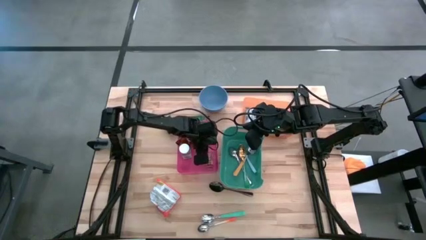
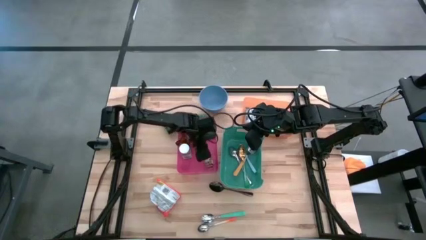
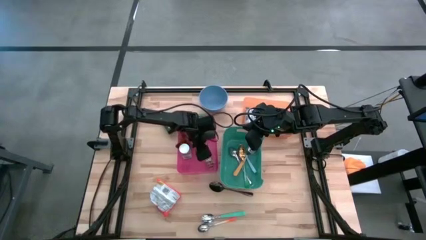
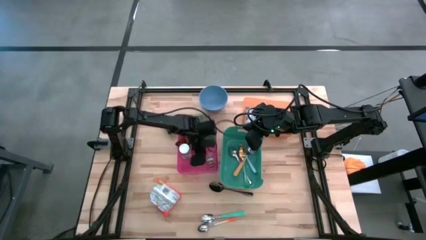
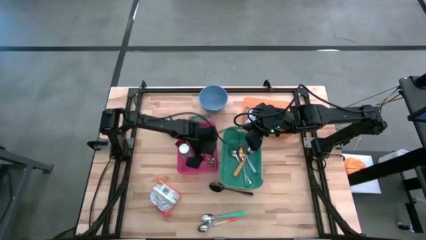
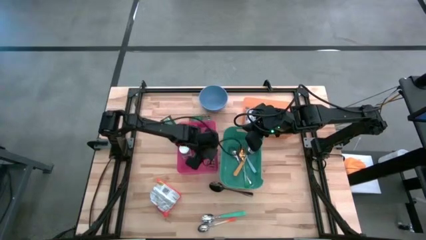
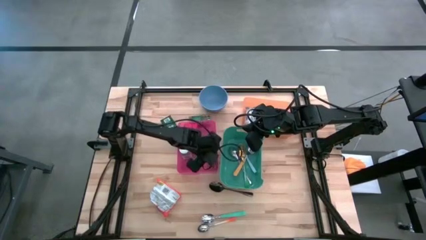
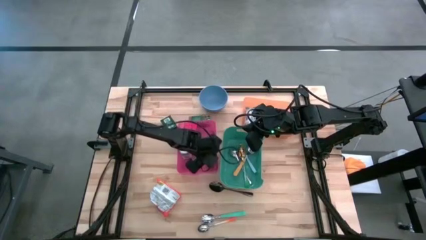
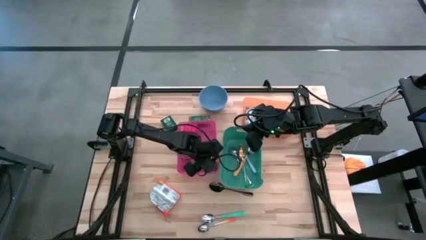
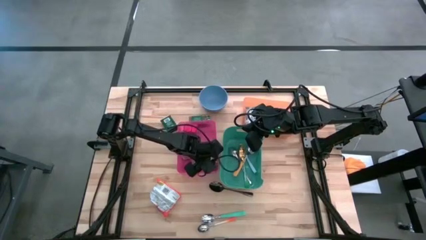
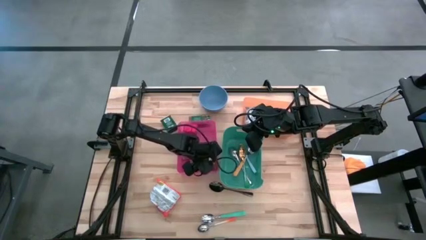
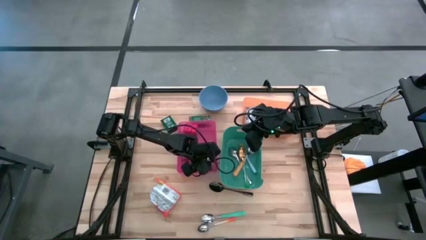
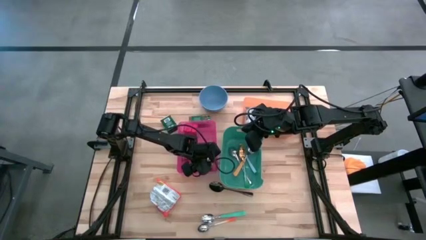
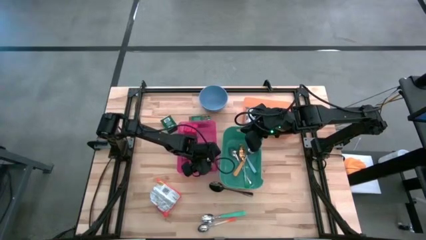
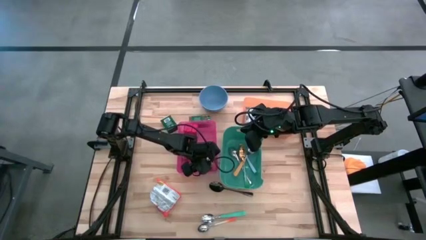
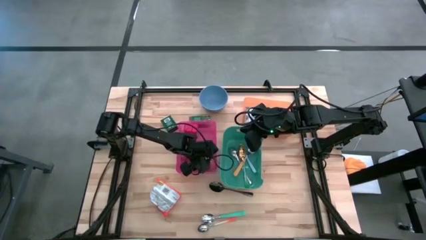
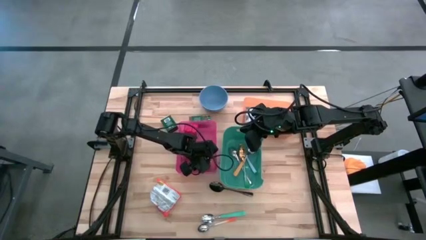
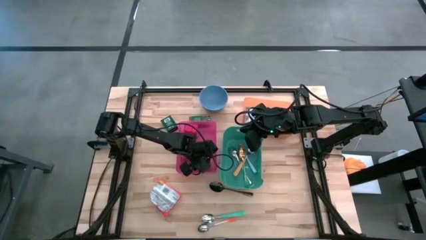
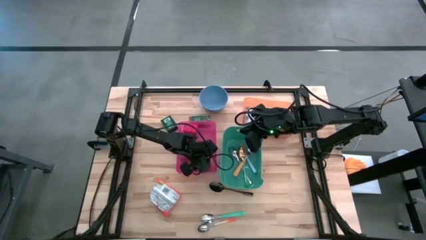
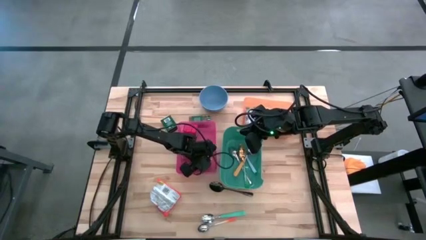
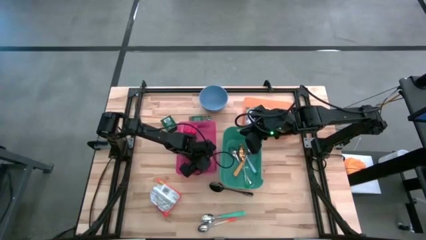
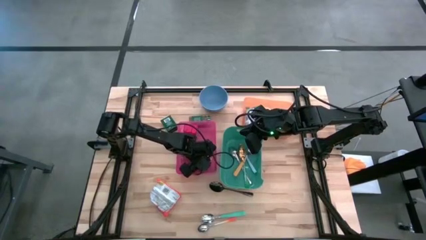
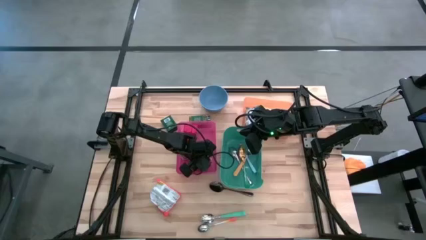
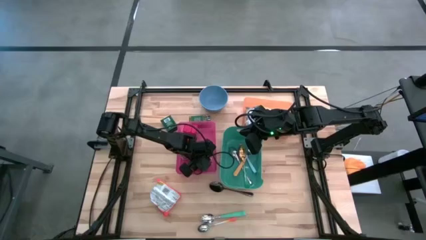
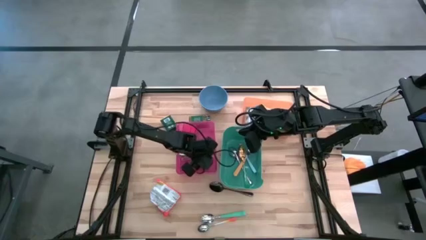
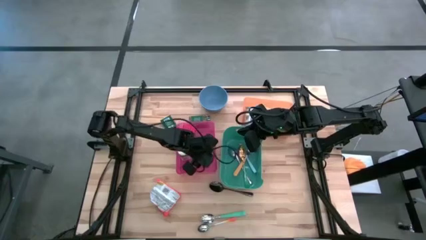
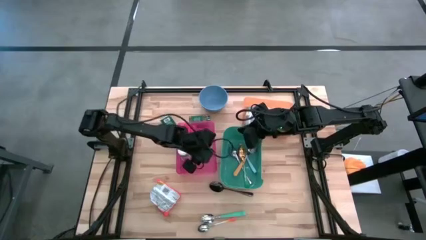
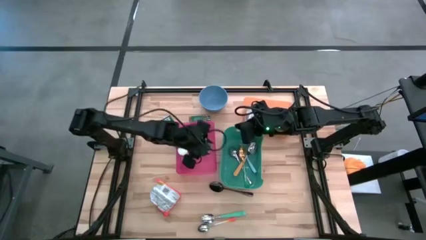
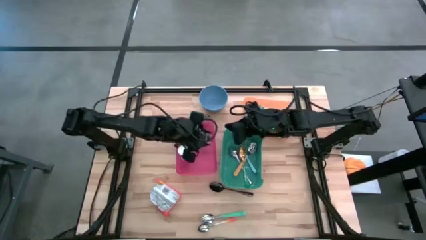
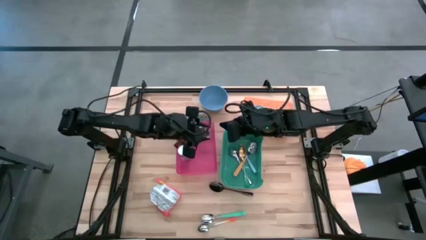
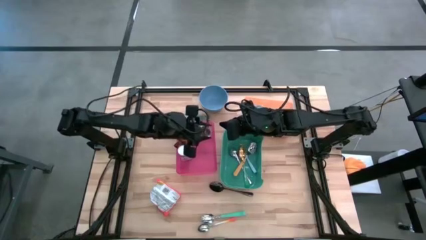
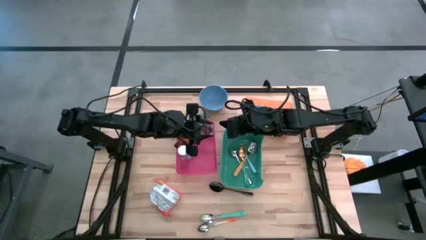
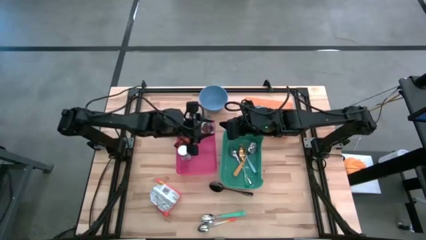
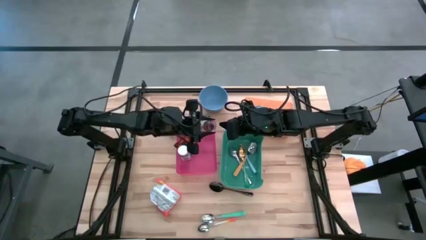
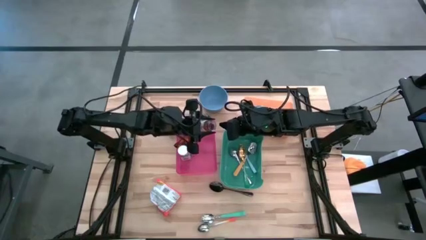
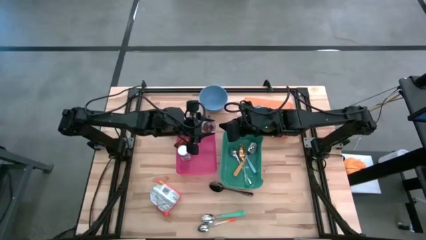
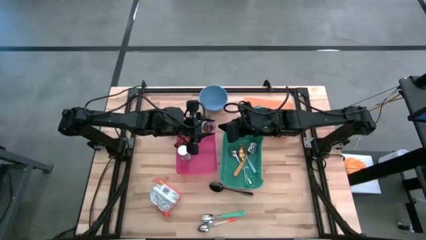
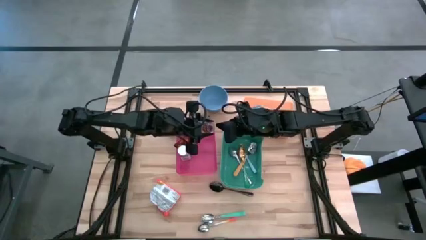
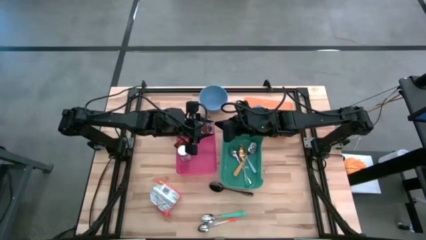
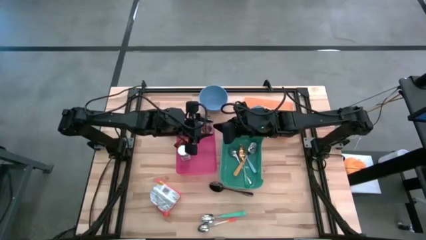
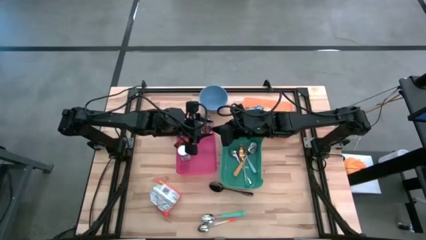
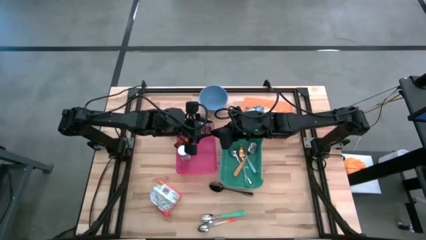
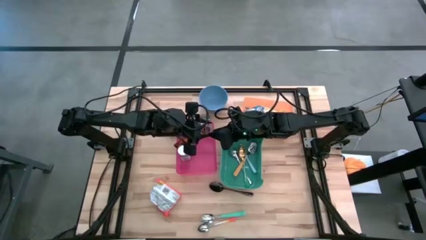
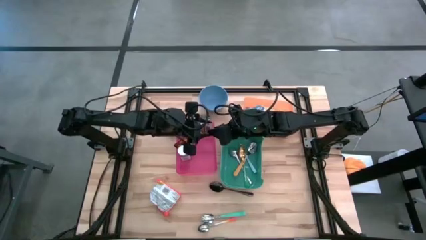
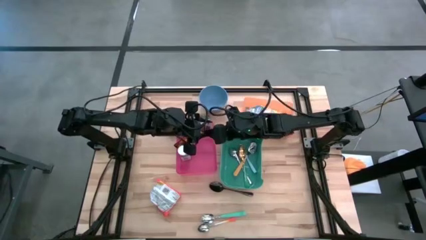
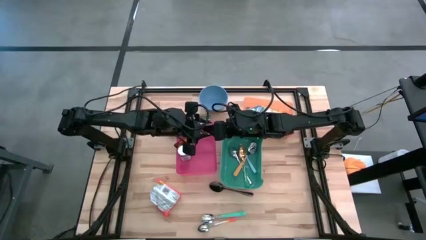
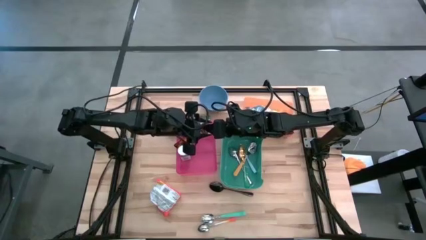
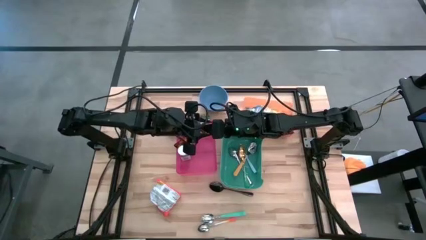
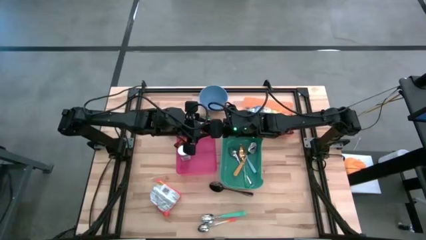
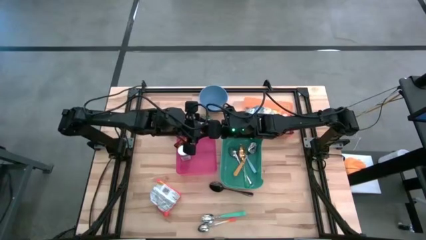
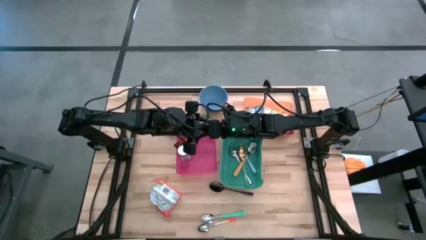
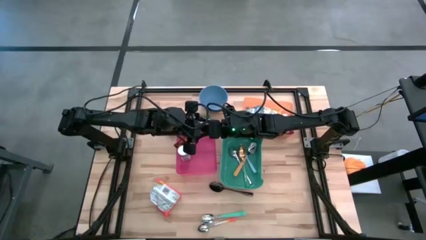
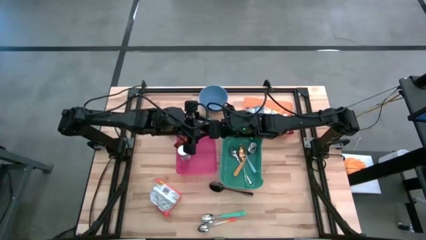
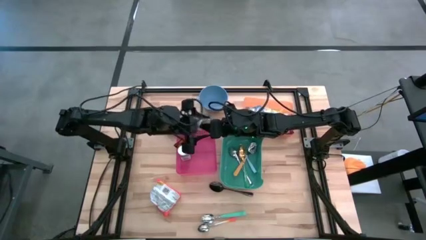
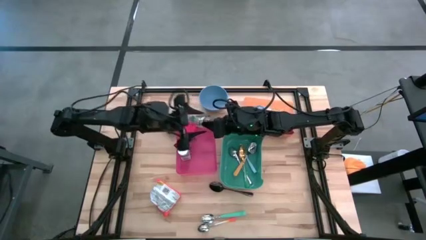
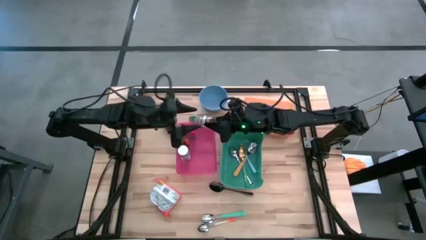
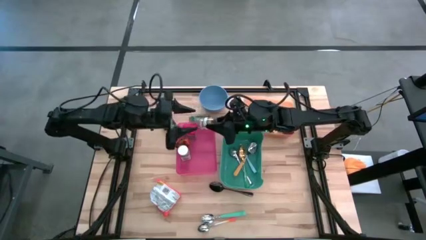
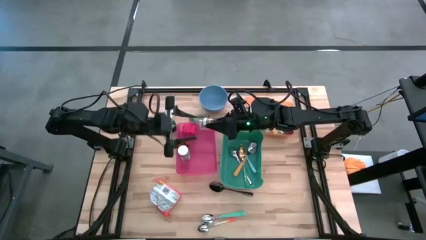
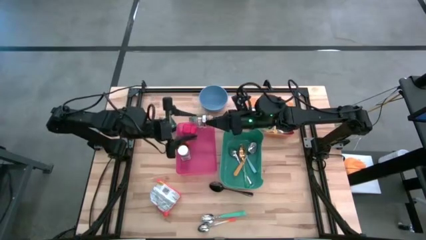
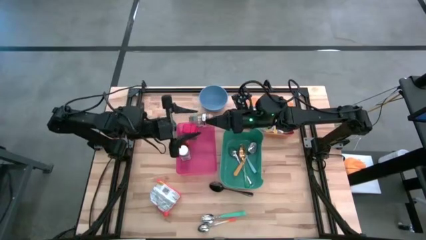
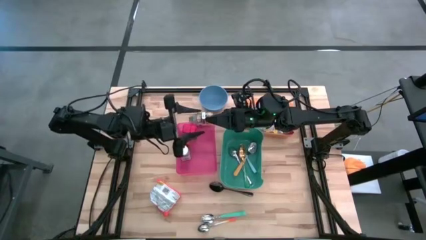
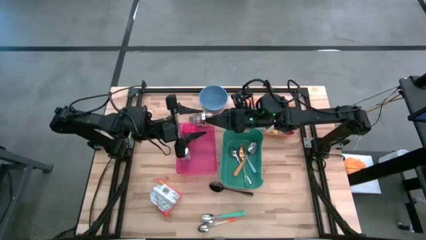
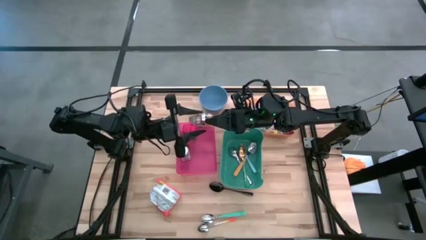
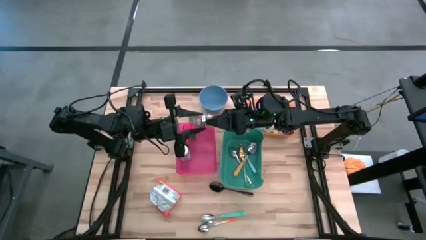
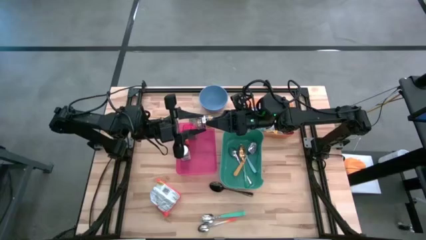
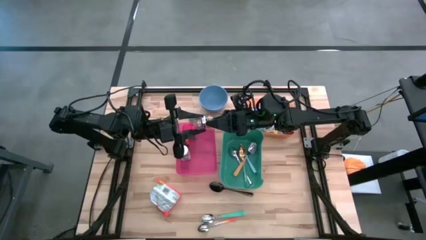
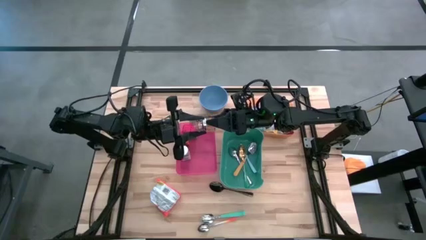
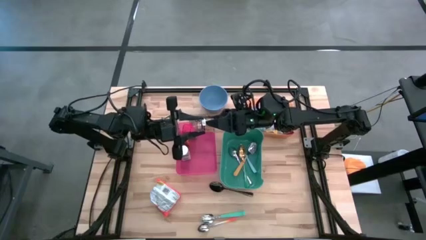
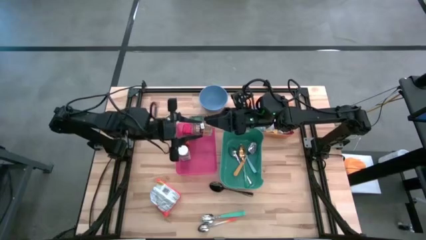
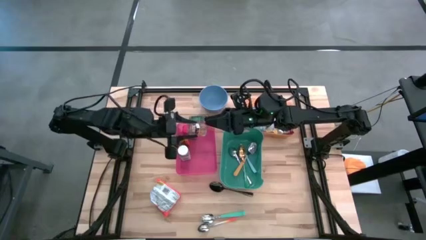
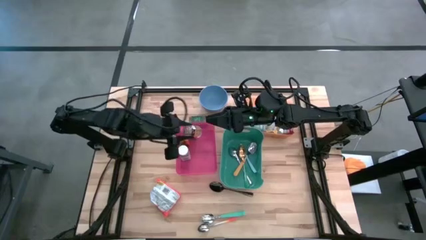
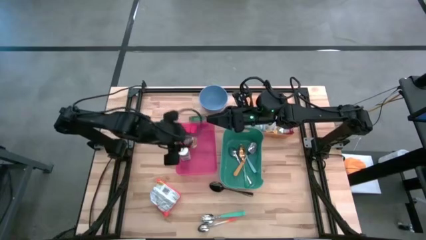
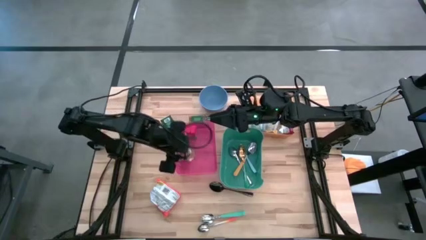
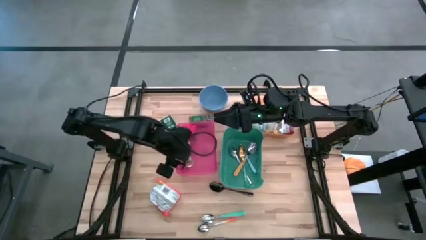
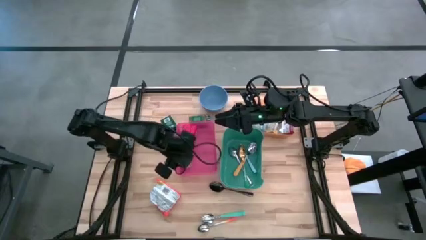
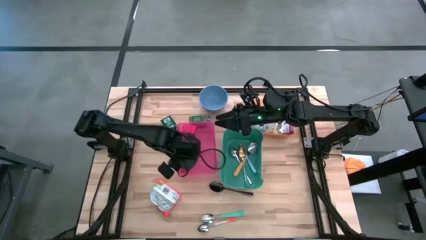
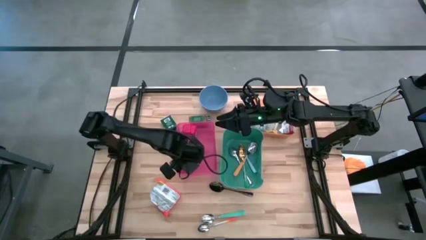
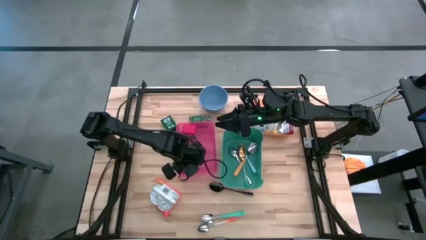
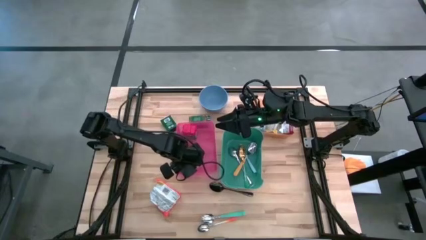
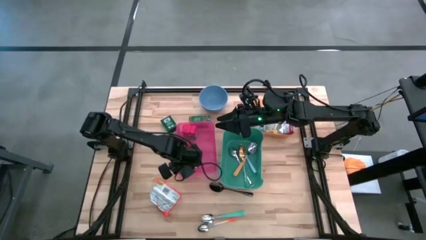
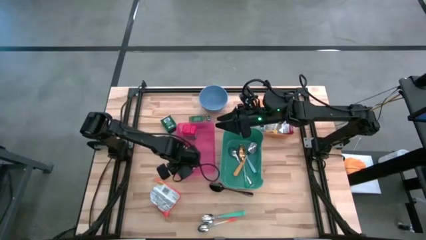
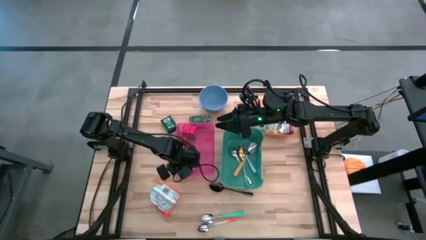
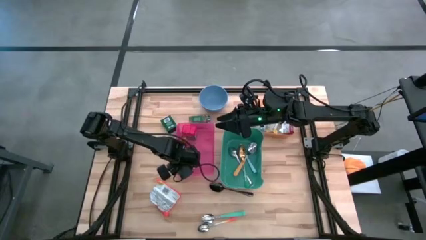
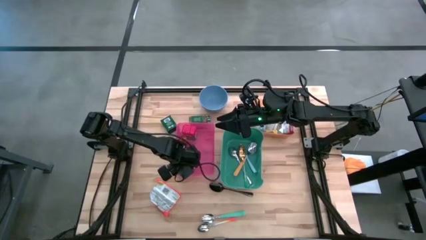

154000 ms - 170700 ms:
Put the brown spice bottle into the red bin
